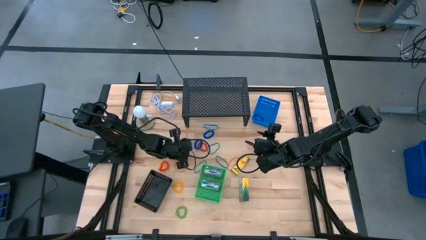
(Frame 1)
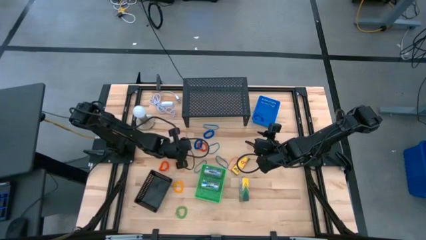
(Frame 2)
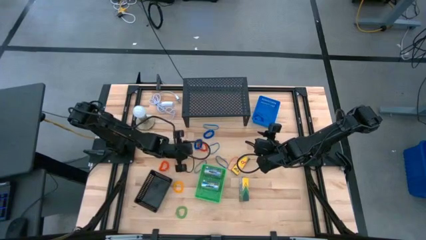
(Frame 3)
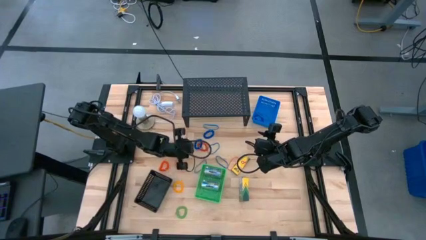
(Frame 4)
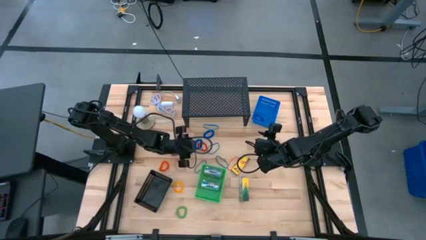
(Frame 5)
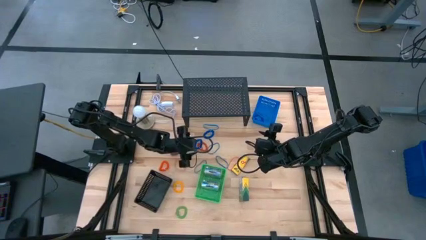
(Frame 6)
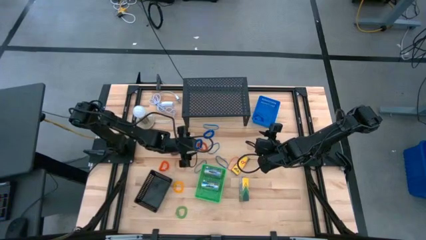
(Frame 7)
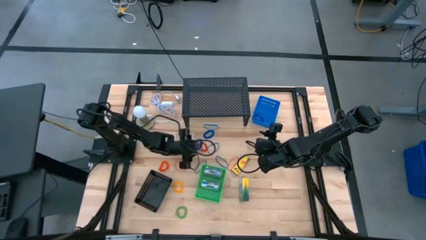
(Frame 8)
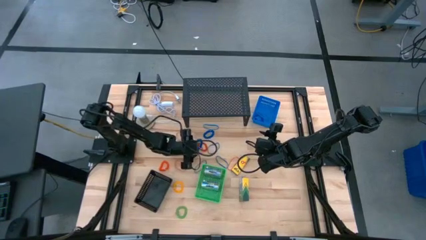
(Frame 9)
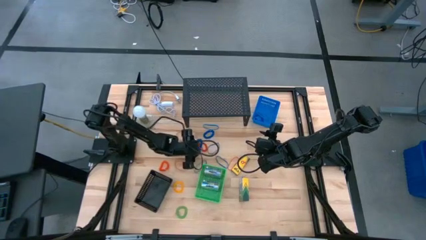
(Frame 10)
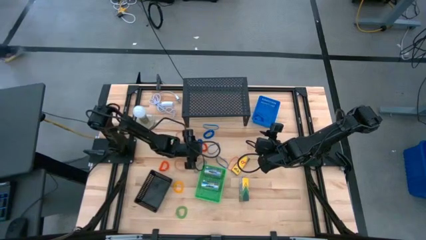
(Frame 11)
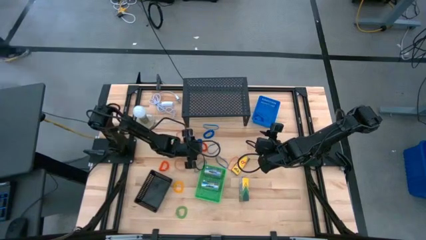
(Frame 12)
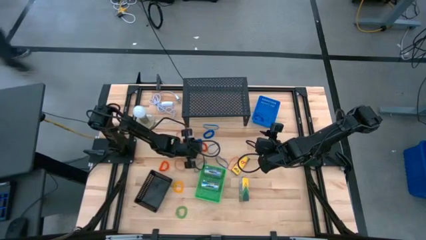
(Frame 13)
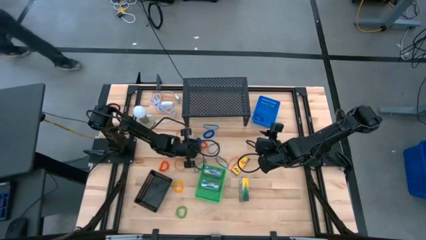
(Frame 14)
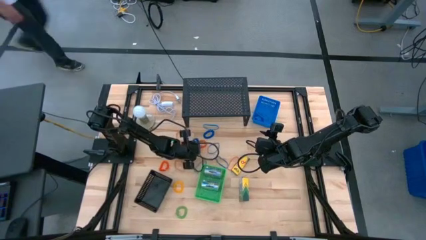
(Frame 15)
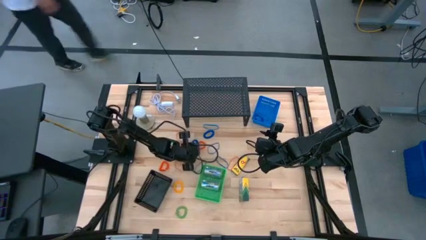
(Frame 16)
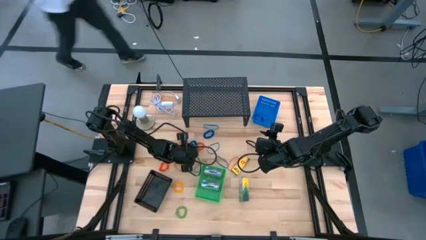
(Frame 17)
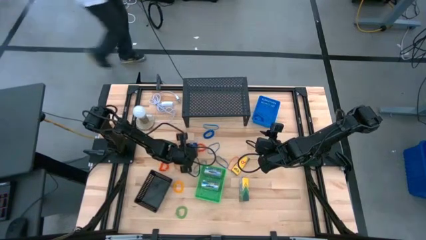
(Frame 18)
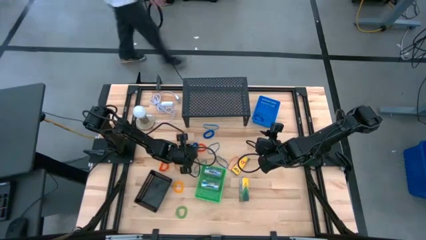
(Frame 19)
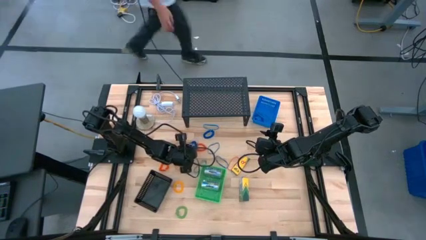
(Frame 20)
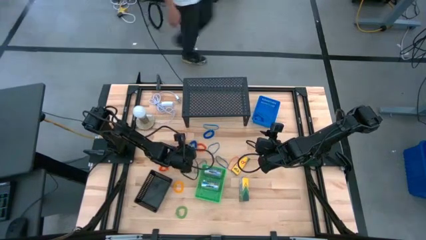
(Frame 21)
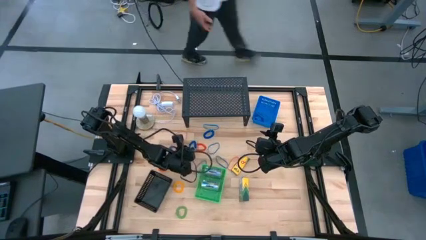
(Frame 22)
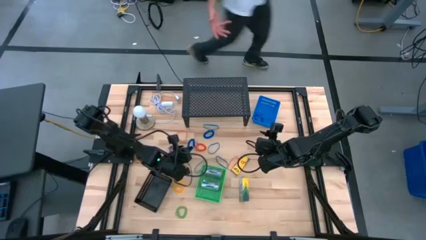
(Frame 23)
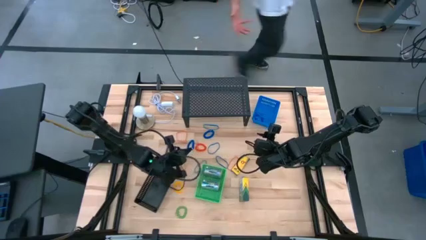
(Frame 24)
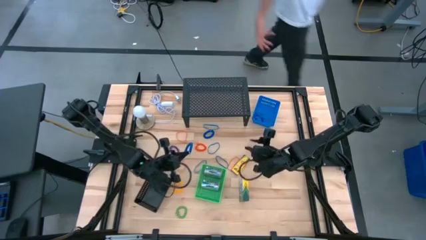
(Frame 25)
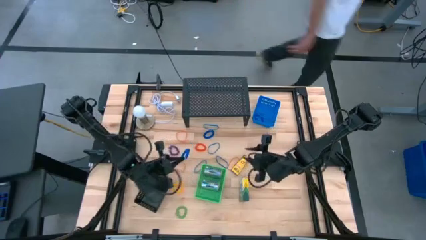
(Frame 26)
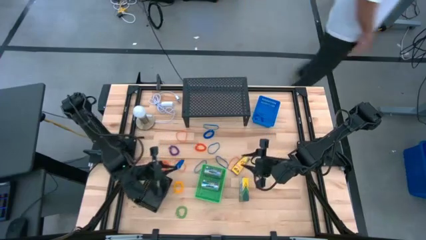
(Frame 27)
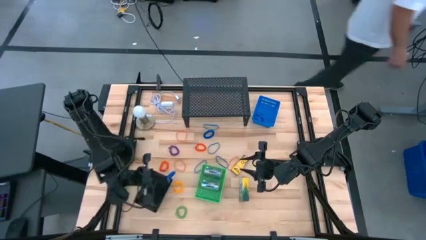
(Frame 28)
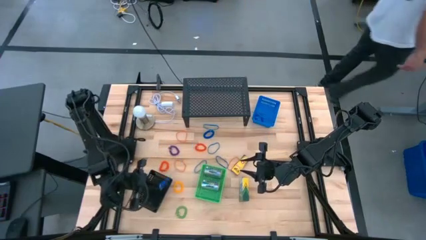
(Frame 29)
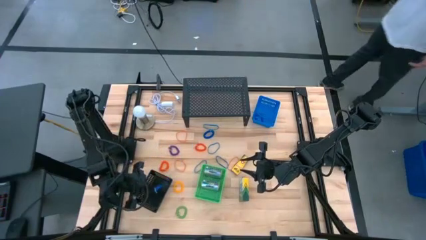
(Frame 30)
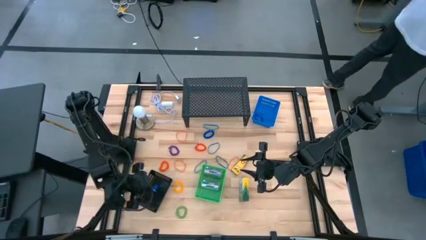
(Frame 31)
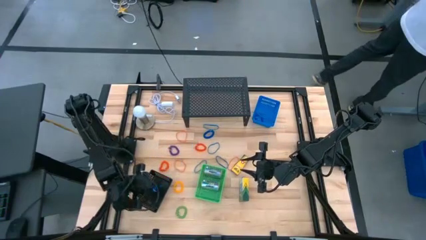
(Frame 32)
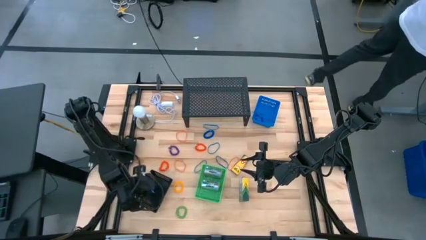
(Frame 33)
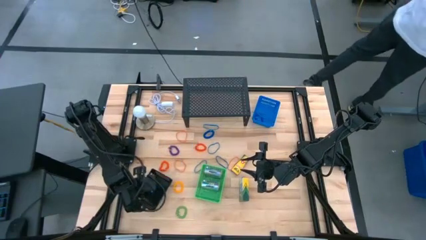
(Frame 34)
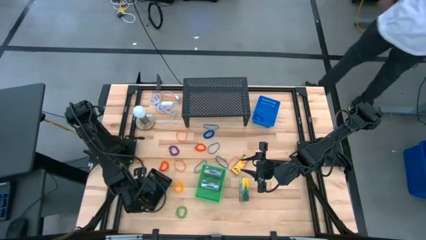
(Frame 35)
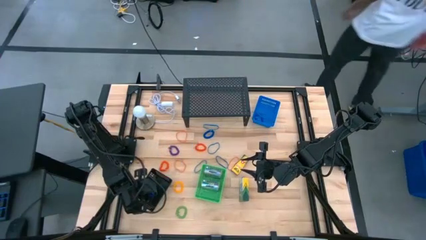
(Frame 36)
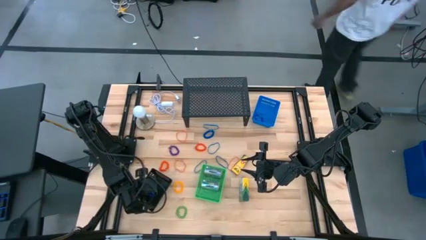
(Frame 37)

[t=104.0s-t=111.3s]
Task: Pick & Place Office Desk Supplies
Put the blue spring keychain into the black bin

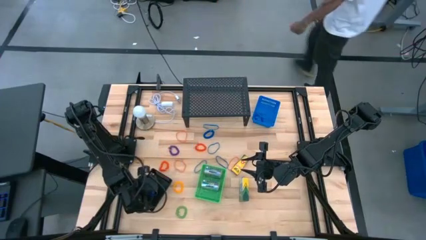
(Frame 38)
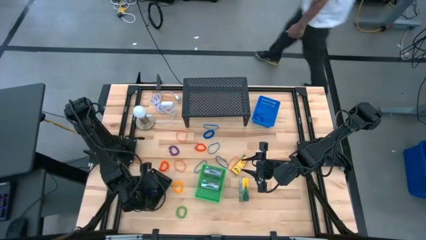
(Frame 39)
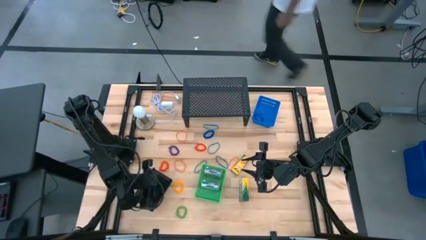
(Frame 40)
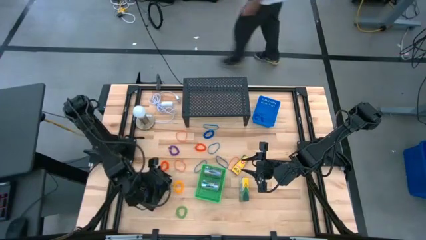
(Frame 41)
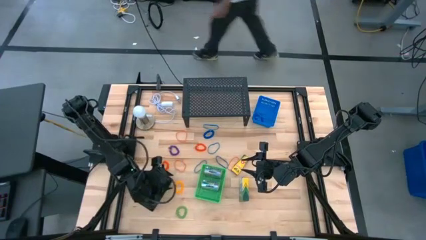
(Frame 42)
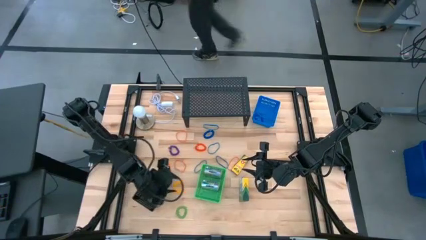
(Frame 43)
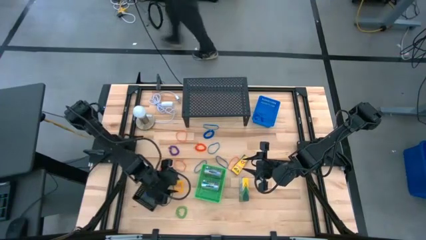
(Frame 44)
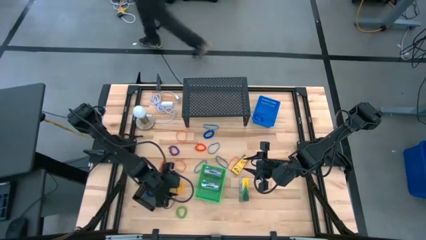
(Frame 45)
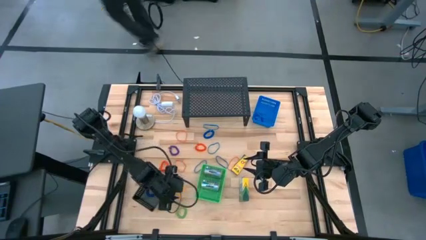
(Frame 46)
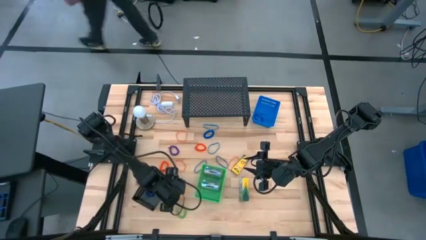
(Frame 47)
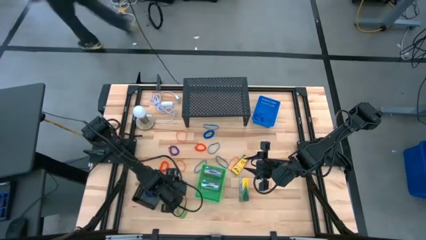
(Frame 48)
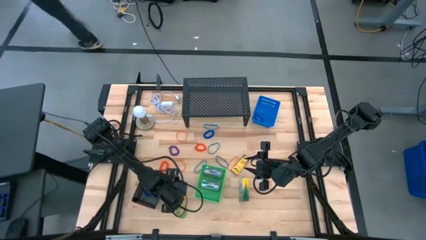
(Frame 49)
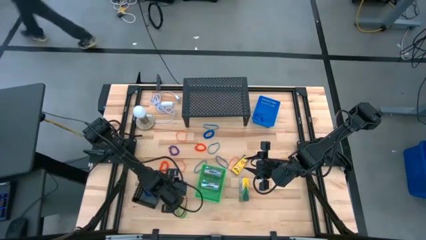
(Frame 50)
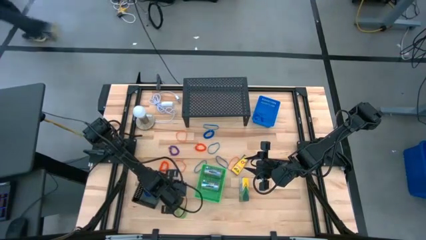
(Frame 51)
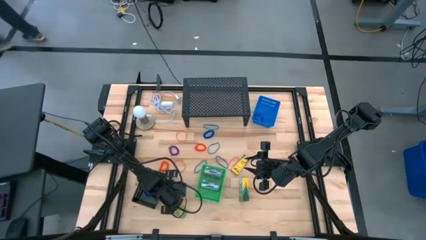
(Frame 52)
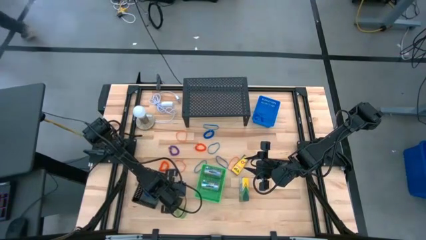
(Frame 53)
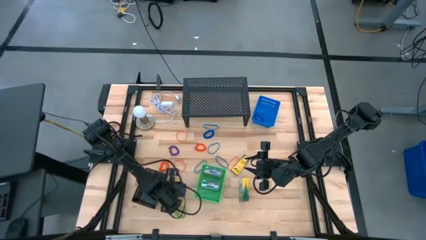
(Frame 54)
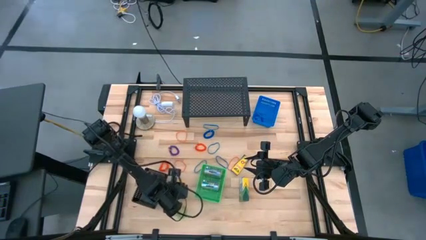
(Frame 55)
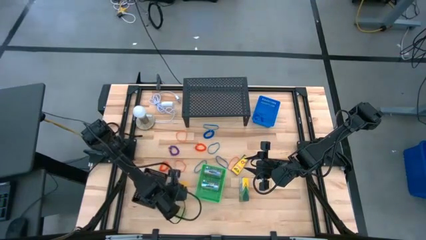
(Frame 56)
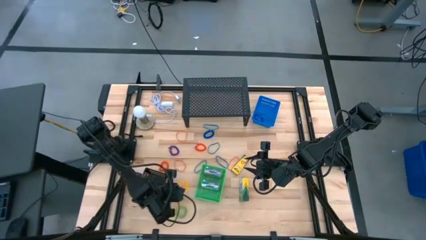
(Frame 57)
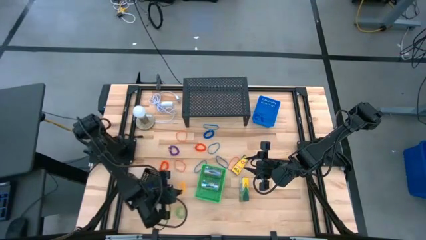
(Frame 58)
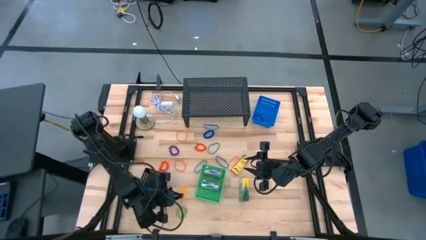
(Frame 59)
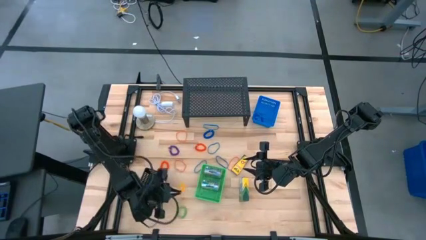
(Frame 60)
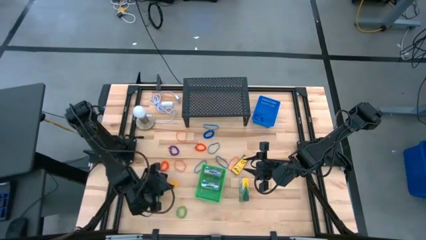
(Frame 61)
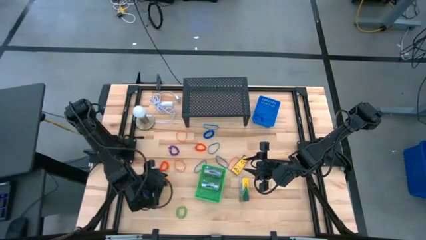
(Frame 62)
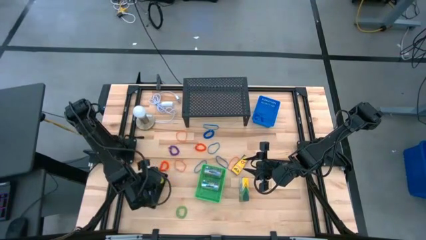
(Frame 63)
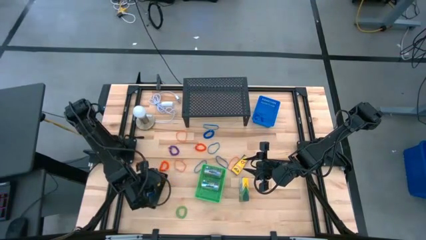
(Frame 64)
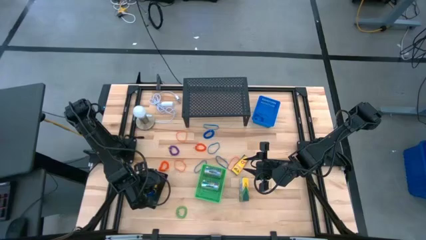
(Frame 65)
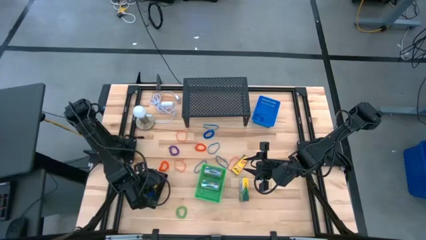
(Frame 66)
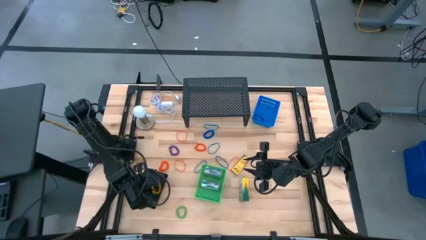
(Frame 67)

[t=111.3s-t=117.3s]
Put the yellow spring keychain into the black bin

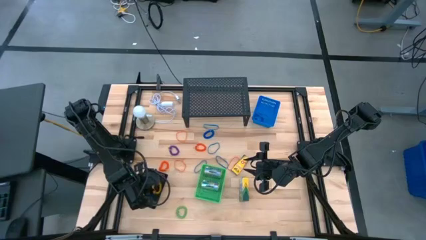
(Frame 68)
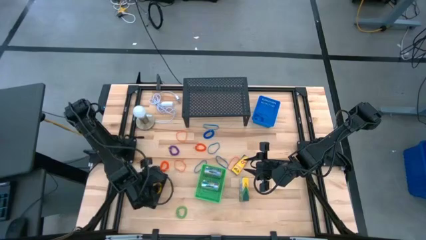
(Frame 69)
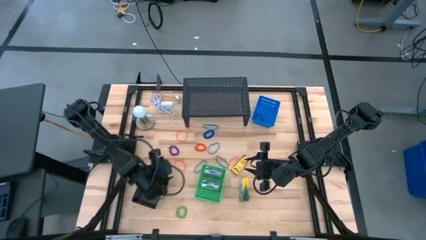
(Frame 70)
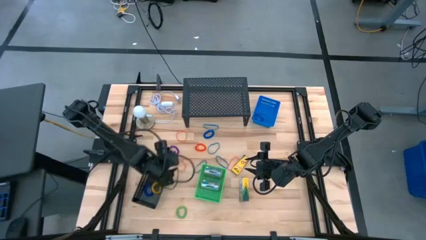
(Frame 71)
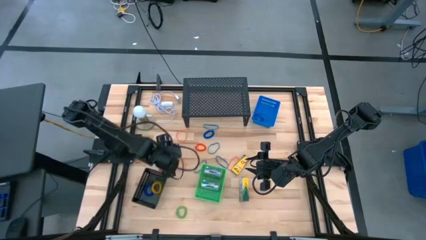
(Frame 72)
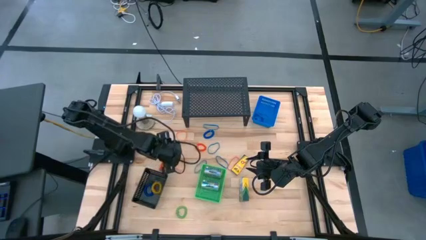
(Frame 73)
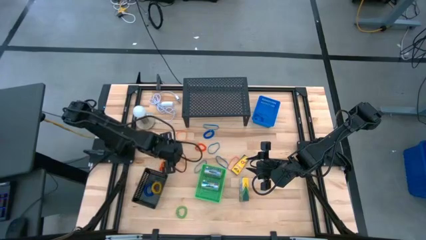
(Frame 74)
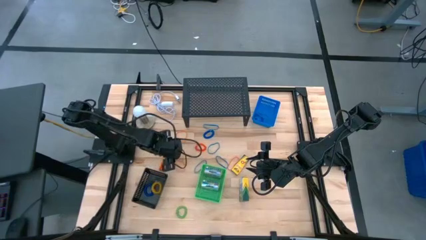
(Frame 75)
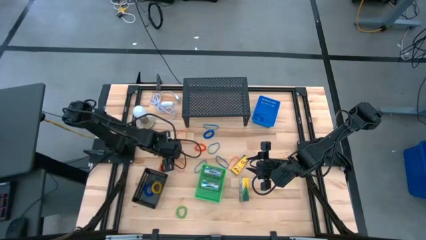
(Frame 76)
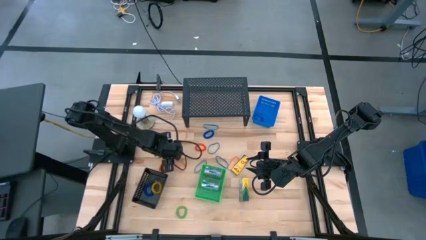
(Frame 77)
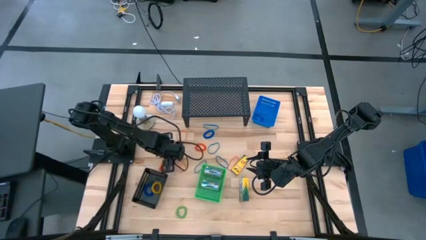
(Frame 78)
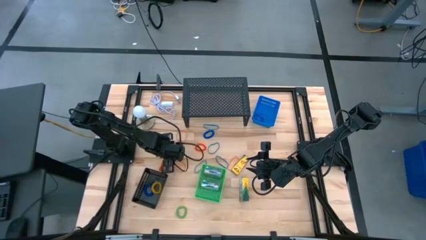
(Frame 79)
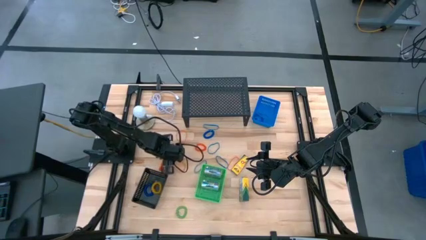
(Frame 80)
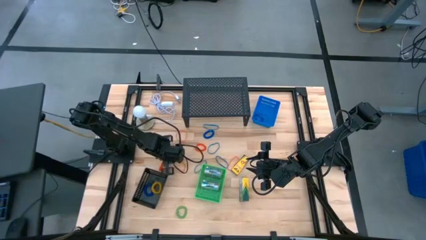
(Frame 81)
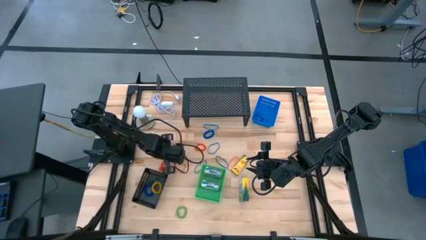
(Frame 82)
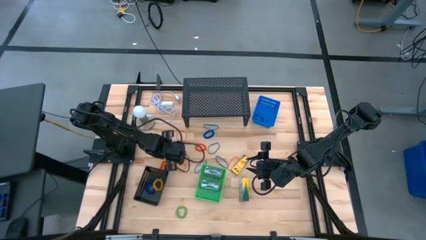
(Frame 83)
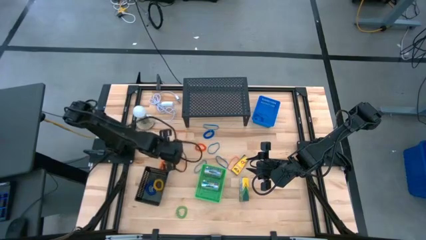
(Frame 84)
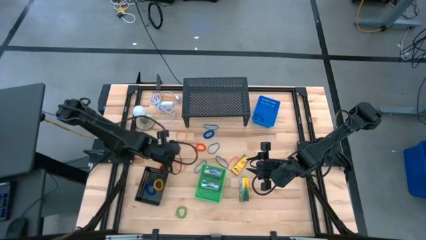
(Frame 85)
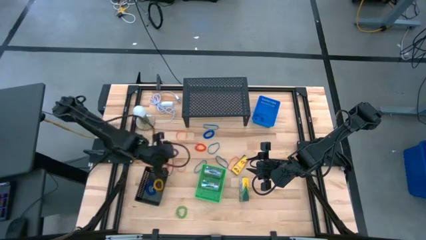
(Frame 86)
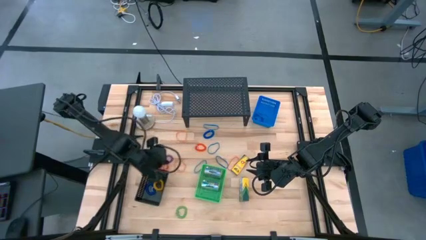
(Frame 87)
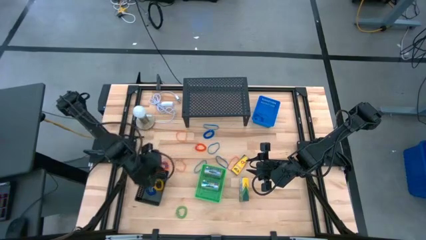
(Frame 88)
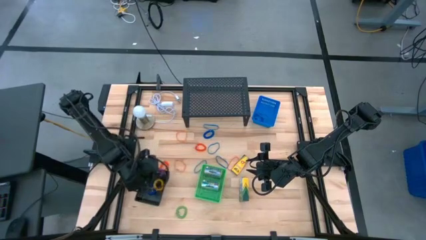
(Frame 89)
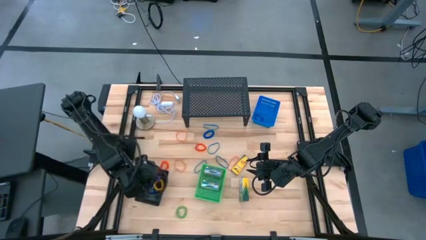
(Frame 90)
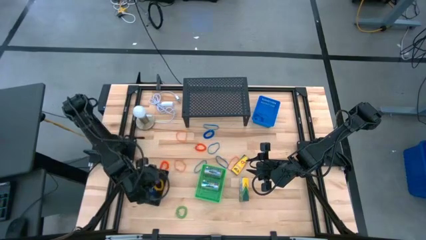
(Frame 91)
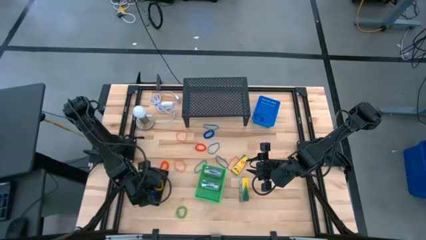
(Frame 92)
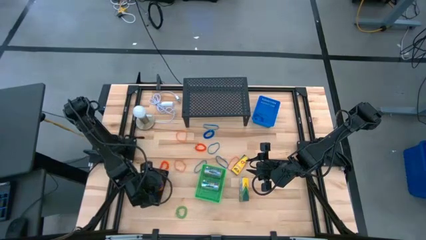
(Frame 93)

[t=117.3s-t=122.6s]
Put the violet spring keychain into the black bin
